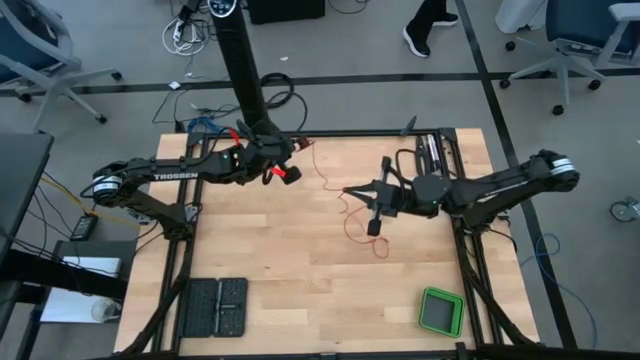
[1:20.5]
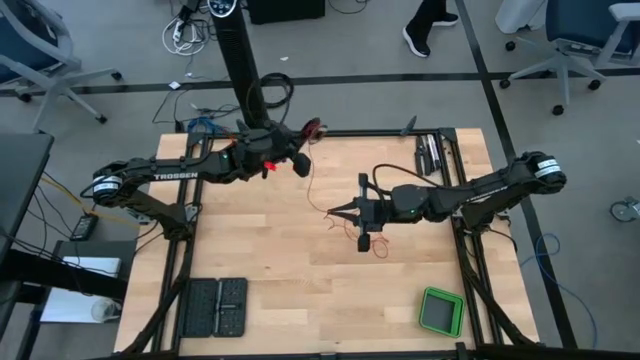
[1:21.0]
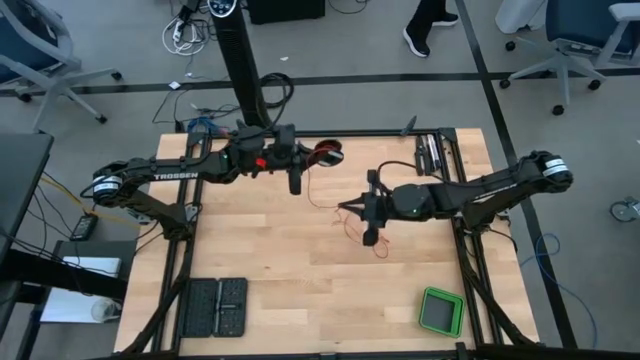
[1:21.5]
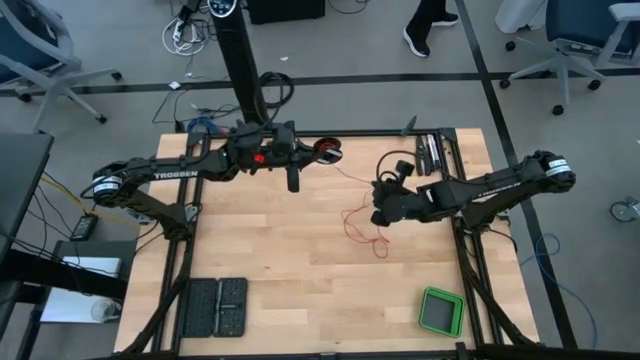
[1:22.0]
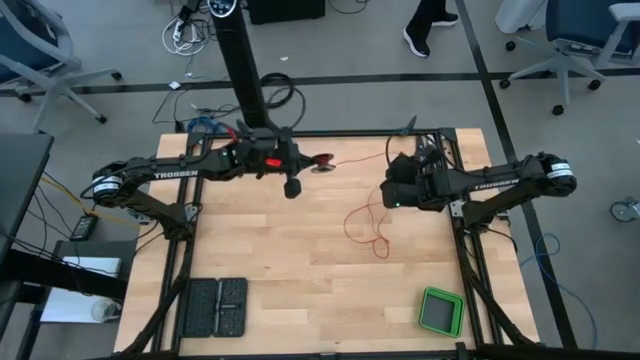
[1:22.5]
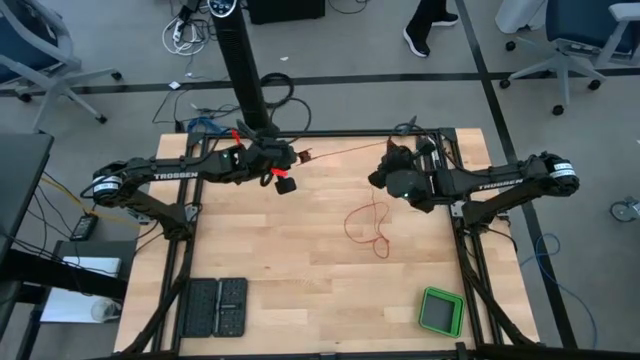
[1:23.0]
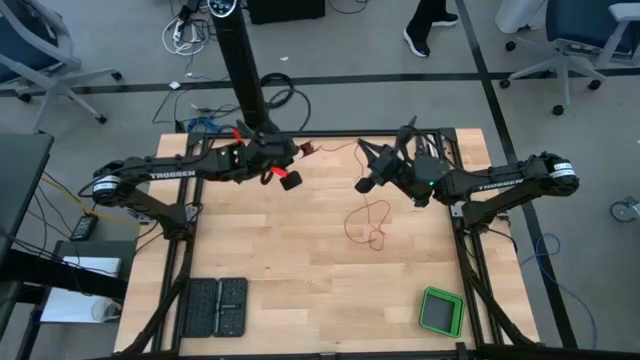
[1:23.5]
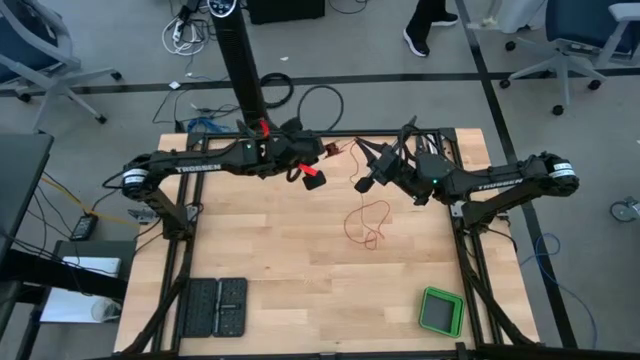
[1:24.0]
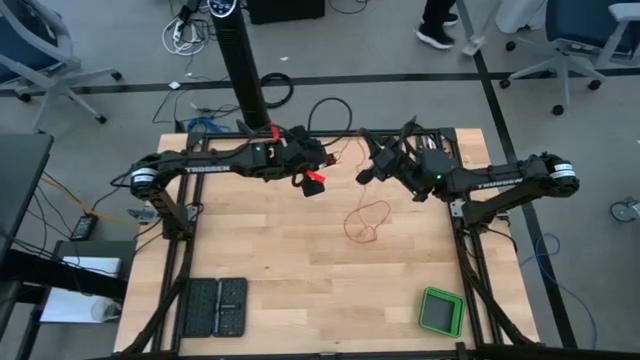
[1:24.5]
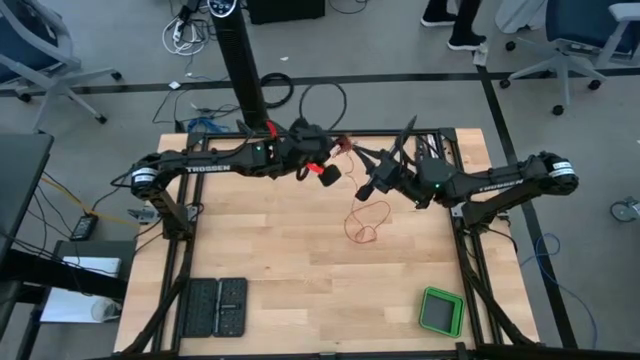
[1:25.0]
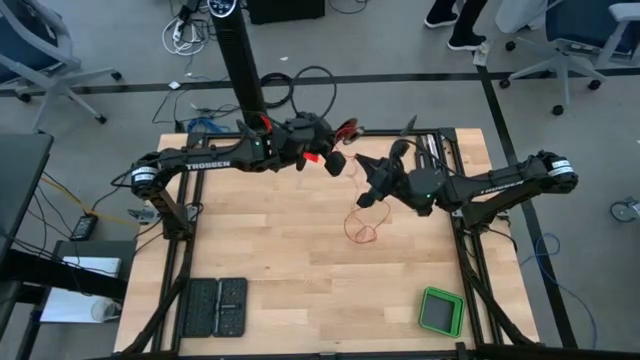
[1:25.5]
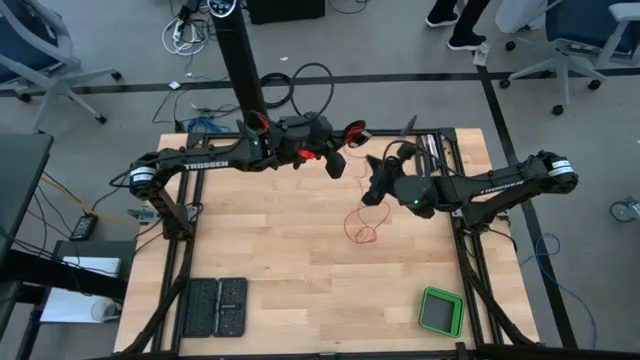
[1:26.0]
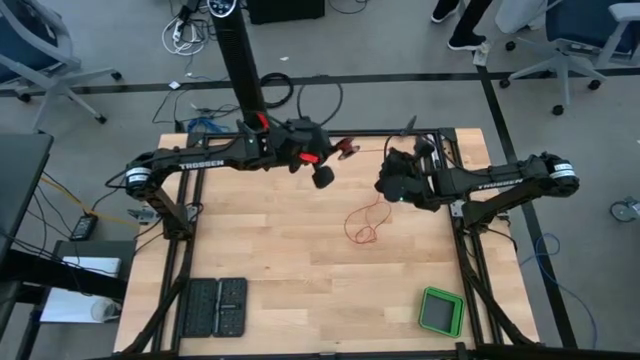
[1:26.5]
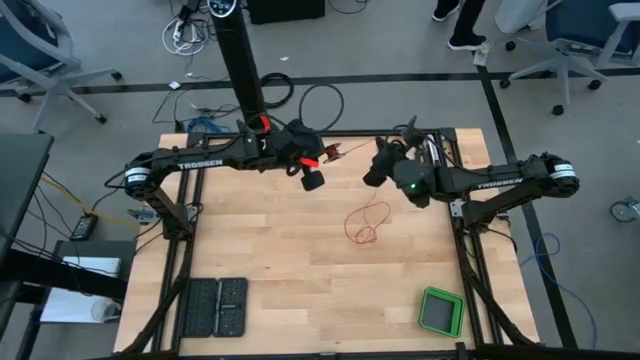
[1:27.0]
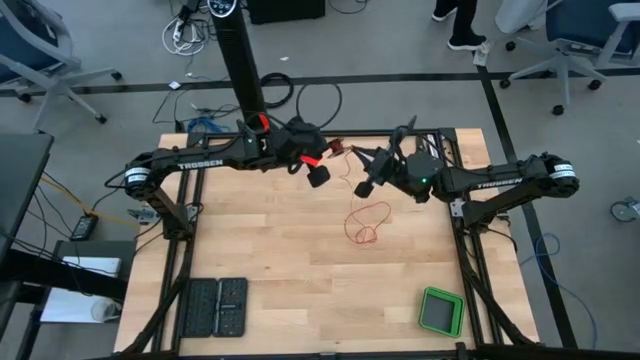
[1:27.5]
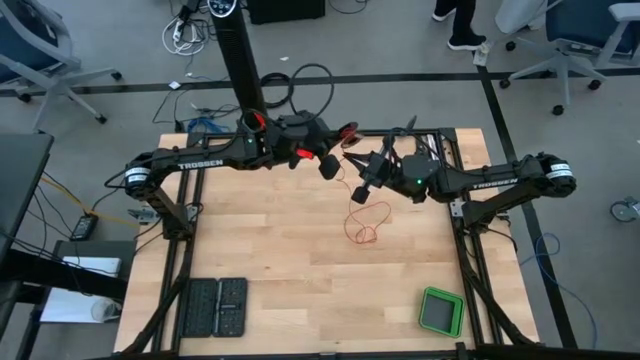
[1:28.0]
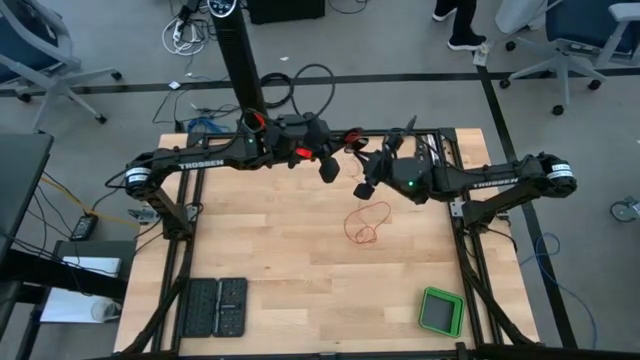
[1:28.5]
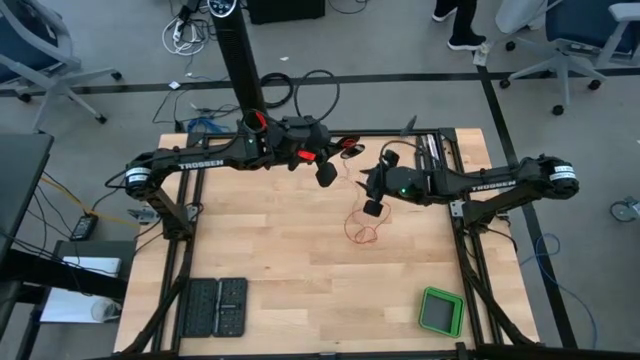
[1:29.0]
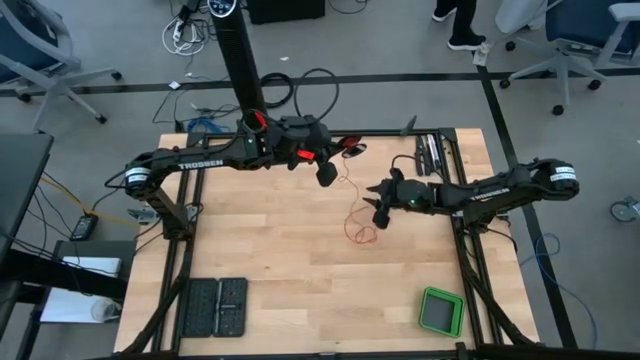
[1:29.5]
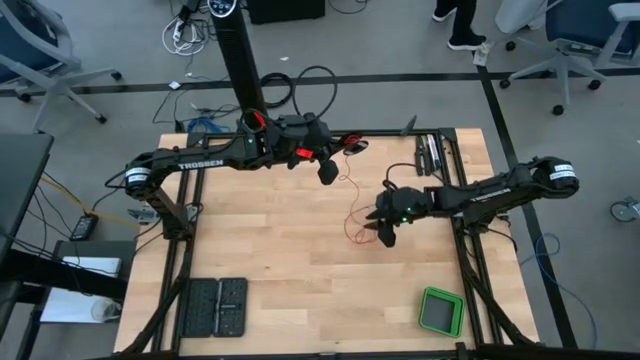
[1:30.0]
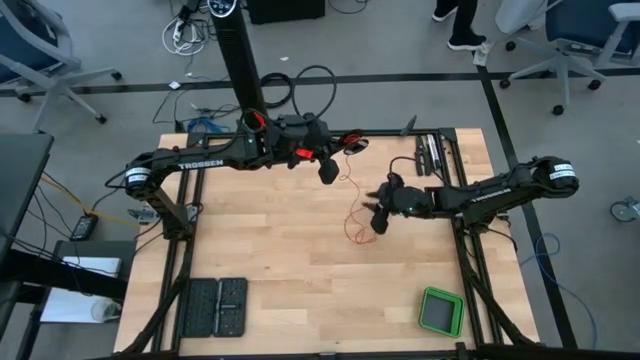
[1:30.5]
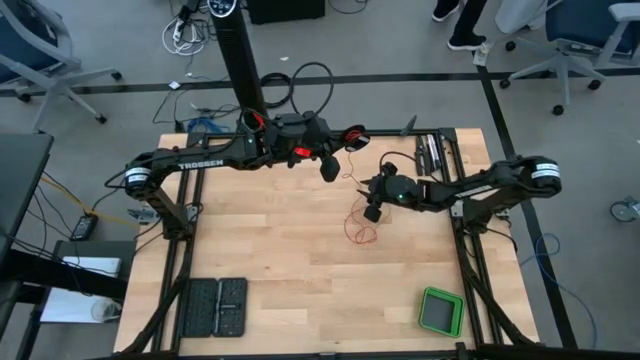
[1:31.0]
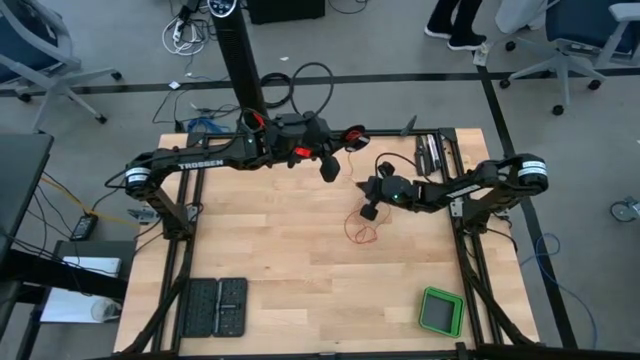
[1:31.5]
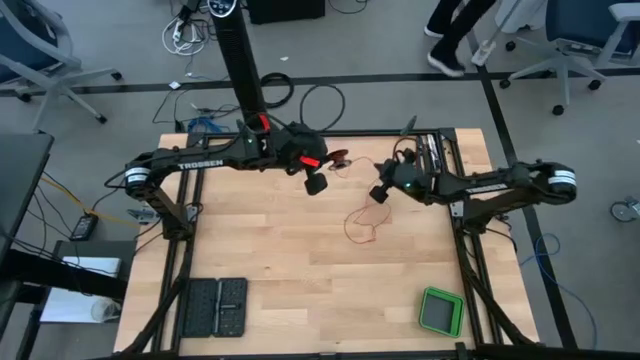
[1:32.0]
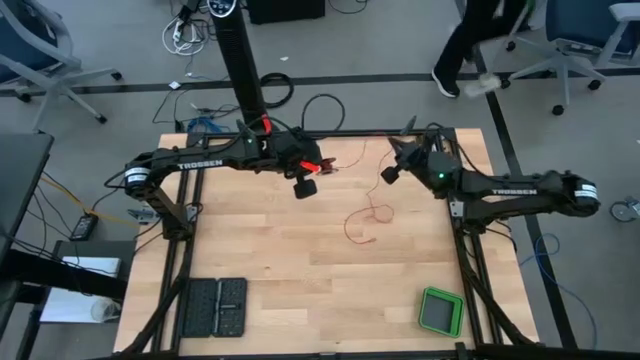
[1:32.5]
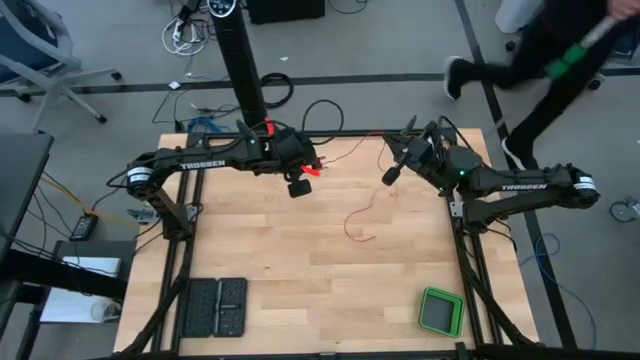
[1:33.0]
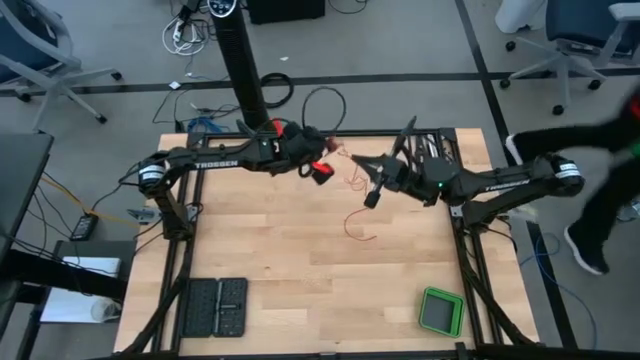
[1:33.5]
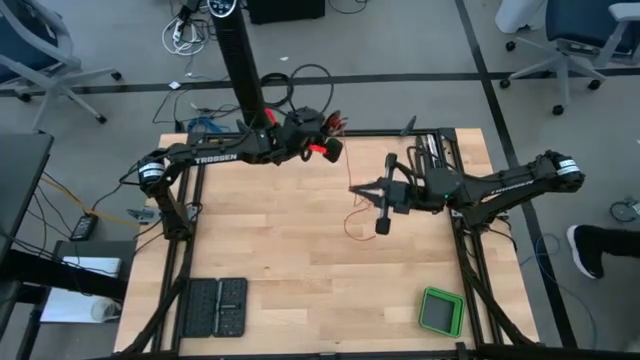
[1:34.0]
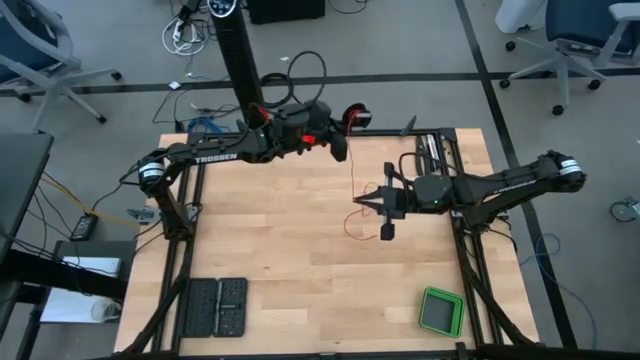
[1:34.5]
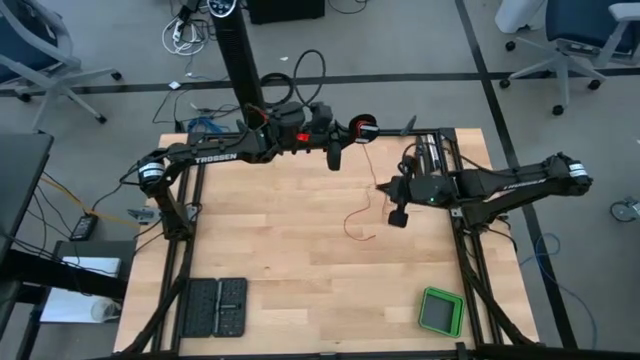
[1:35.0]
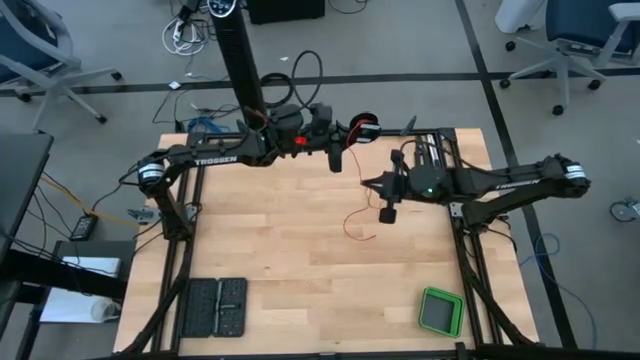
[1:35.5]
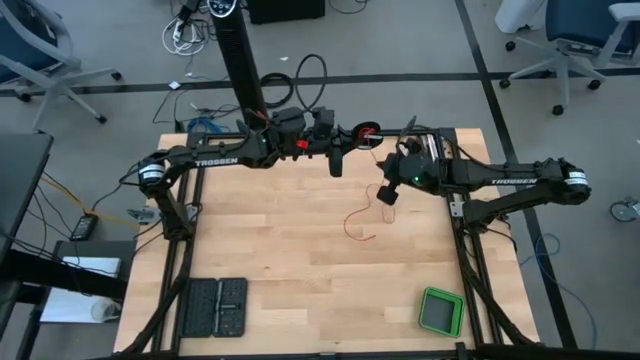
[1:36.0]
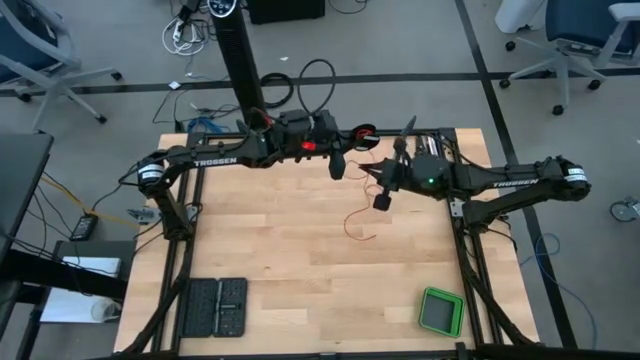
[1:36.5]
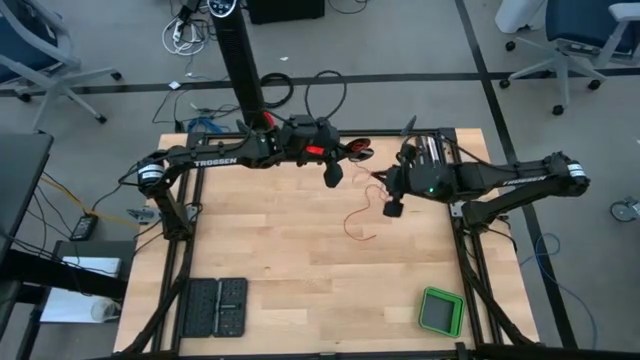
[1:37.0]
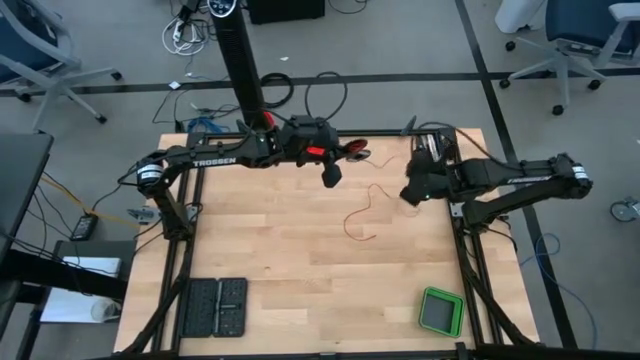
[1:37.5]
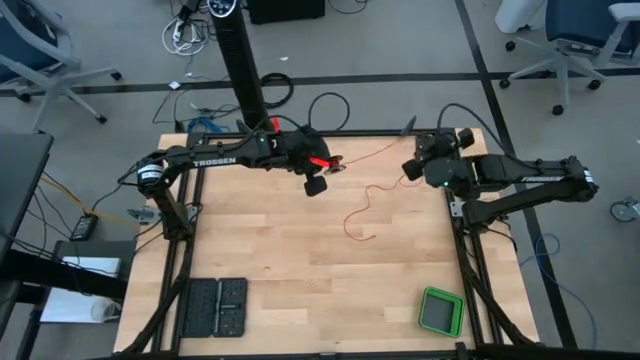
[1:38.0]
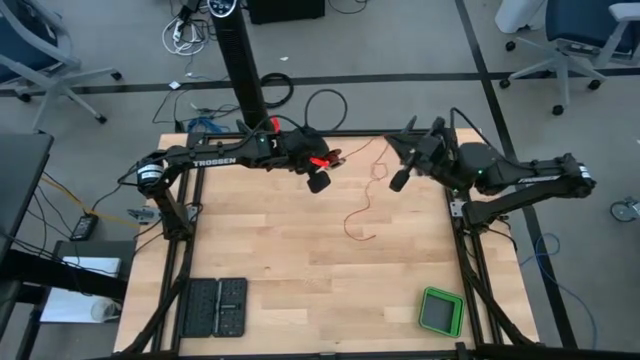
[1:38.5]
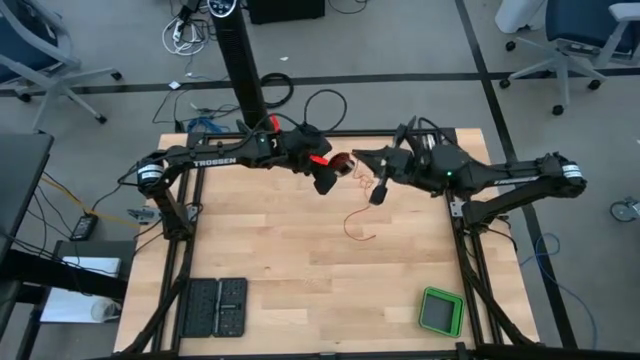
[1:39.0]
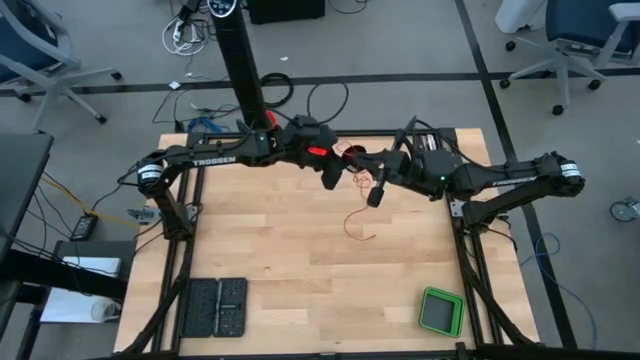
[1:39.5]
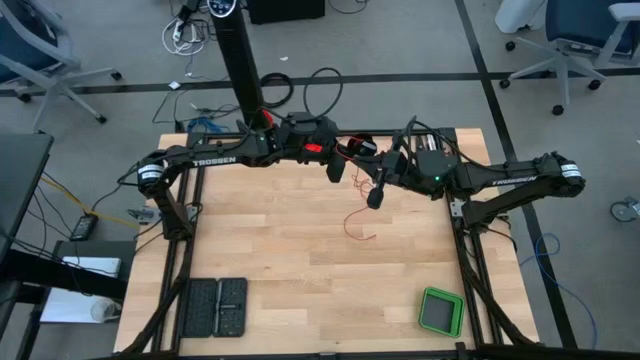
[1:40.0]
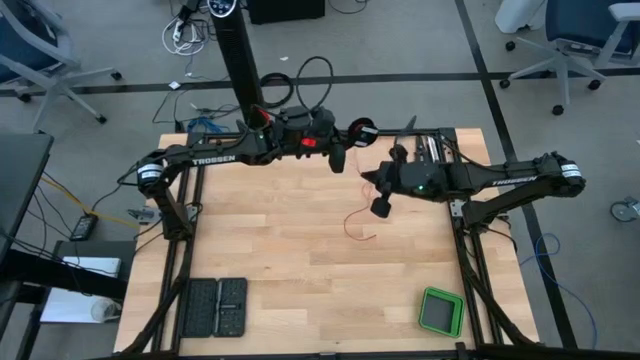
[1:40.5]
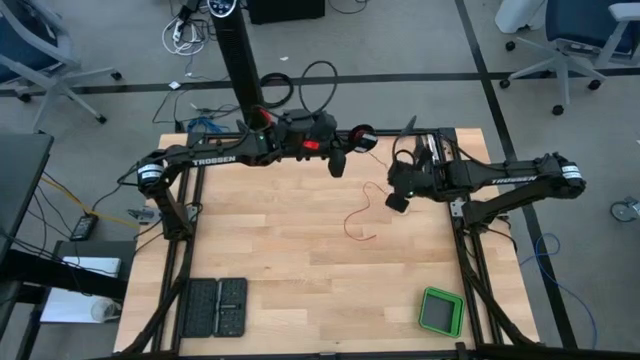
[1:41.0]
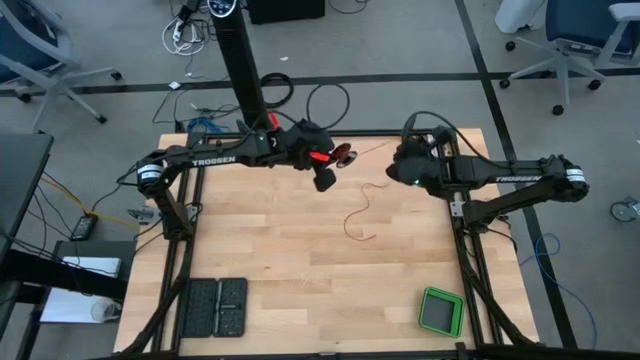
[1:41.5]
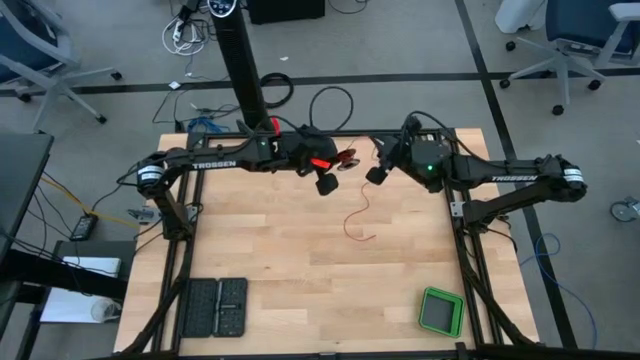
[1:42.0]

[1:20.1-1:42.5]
Task: Coil cords
Coil the red wire cable onto the black spool
